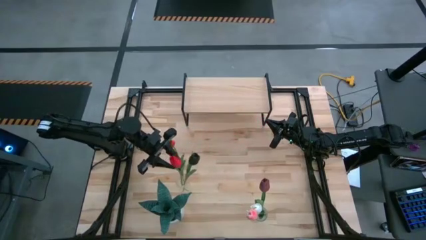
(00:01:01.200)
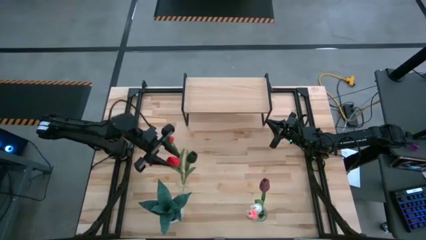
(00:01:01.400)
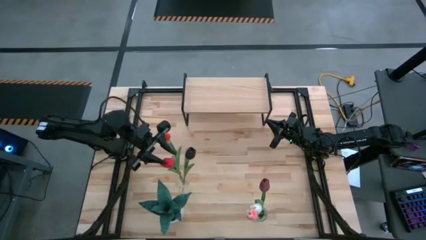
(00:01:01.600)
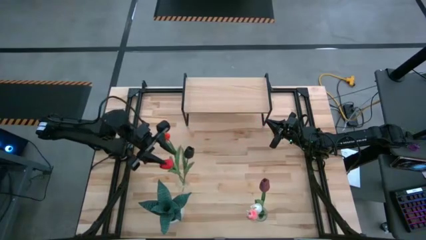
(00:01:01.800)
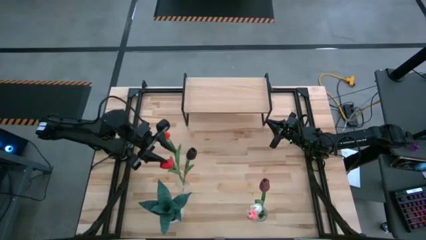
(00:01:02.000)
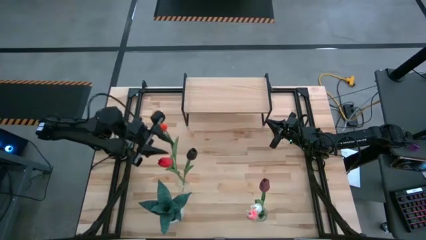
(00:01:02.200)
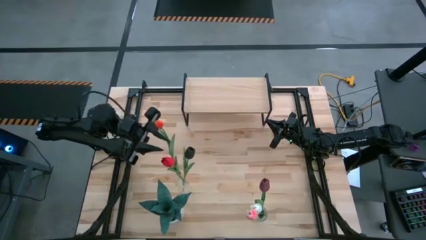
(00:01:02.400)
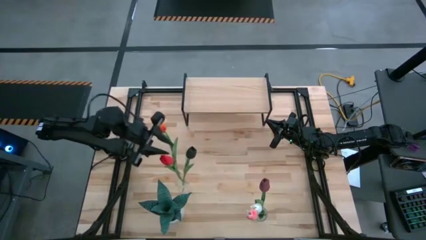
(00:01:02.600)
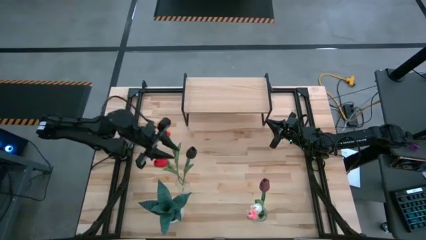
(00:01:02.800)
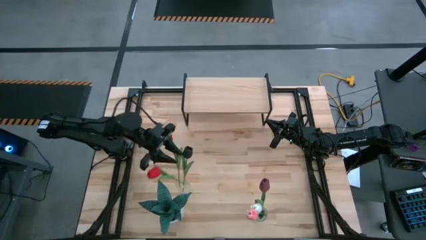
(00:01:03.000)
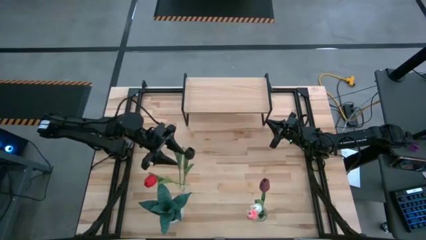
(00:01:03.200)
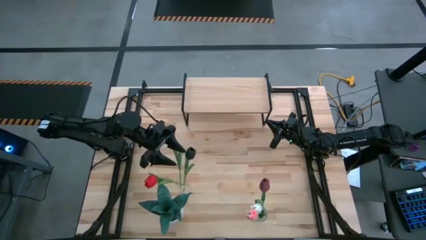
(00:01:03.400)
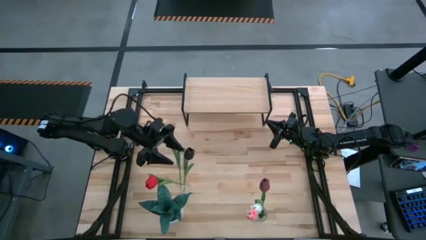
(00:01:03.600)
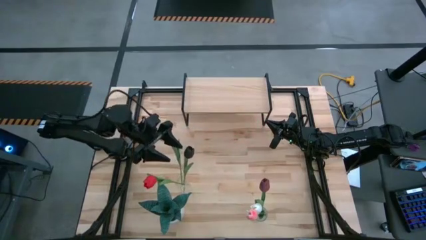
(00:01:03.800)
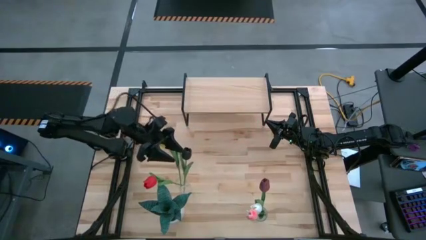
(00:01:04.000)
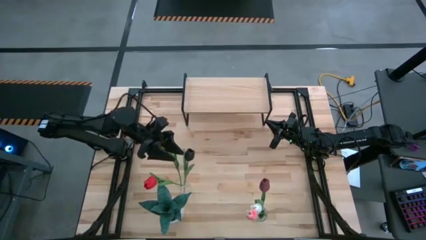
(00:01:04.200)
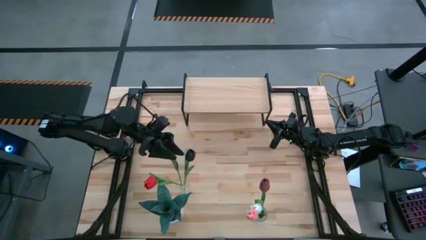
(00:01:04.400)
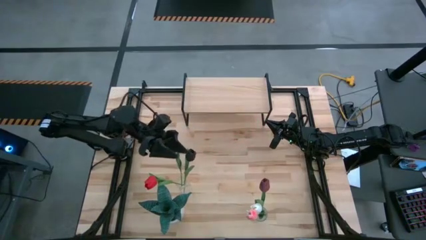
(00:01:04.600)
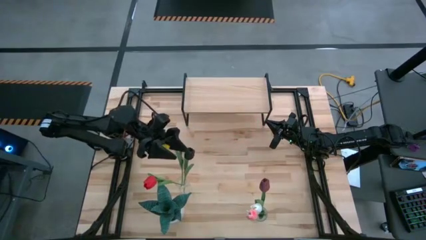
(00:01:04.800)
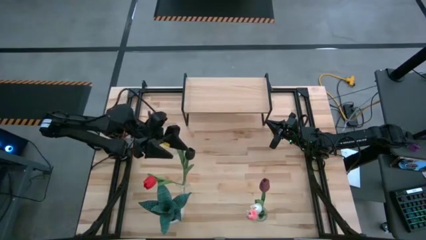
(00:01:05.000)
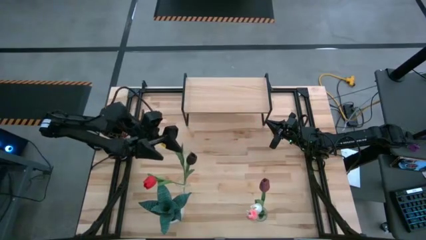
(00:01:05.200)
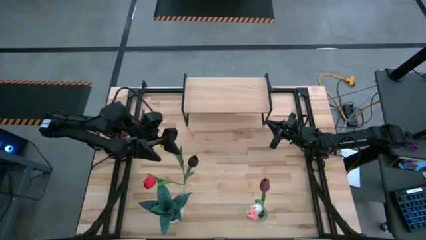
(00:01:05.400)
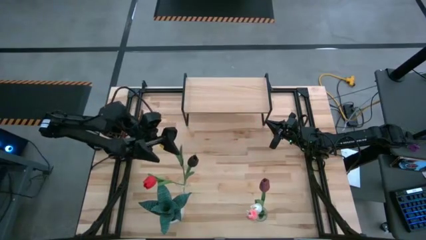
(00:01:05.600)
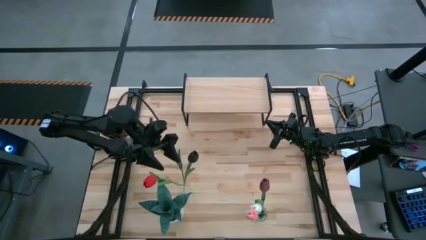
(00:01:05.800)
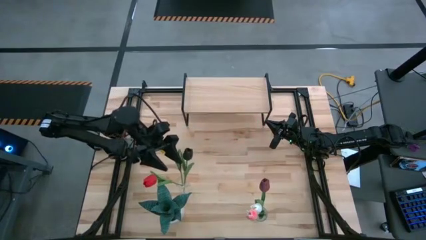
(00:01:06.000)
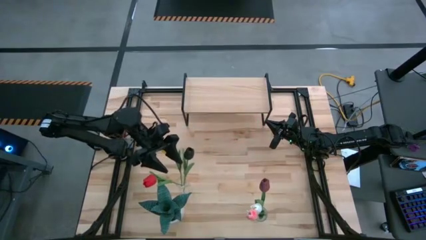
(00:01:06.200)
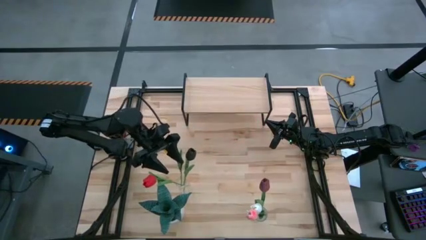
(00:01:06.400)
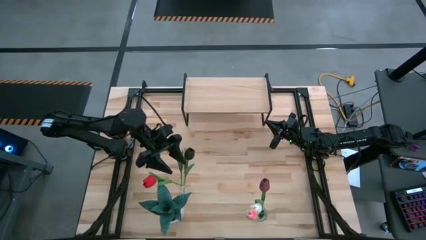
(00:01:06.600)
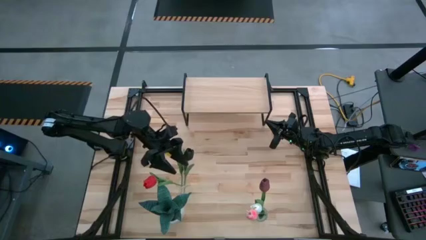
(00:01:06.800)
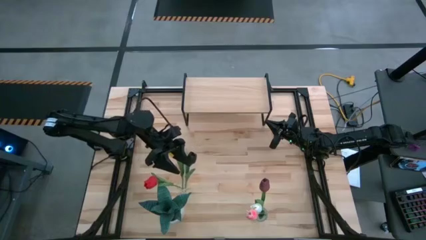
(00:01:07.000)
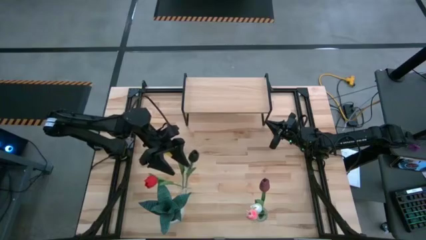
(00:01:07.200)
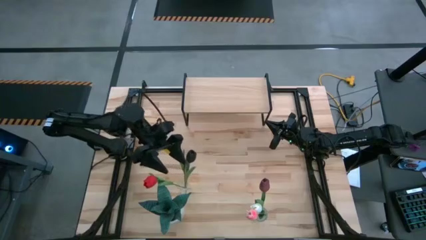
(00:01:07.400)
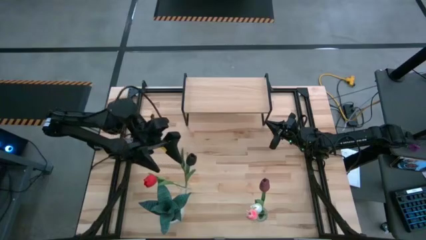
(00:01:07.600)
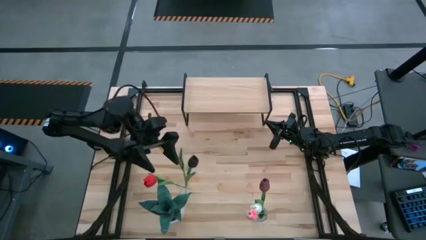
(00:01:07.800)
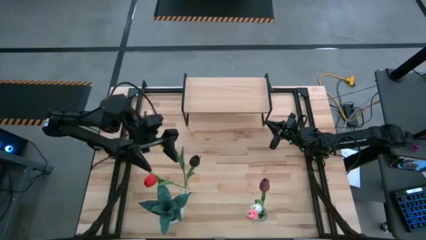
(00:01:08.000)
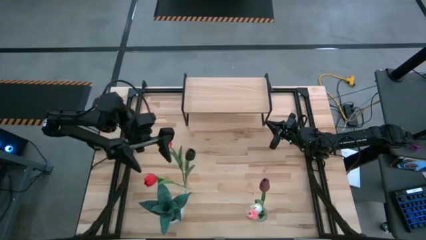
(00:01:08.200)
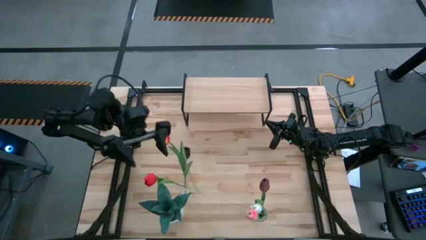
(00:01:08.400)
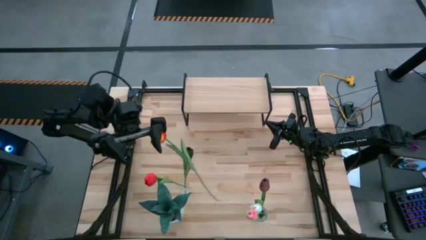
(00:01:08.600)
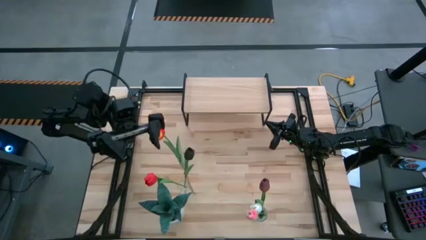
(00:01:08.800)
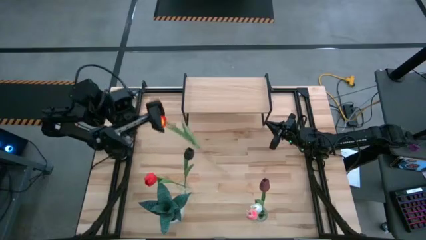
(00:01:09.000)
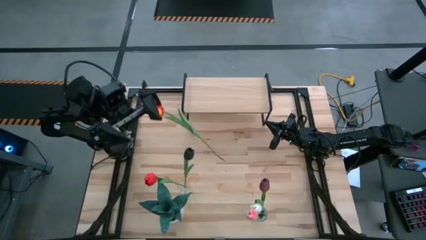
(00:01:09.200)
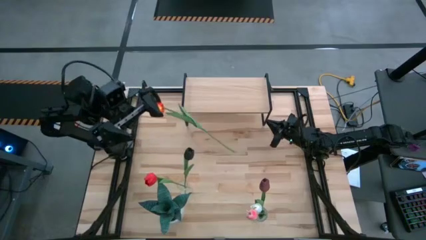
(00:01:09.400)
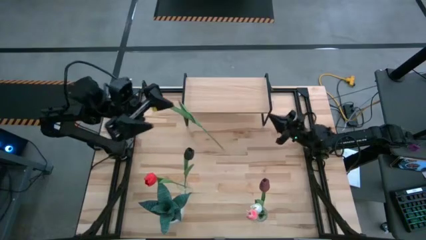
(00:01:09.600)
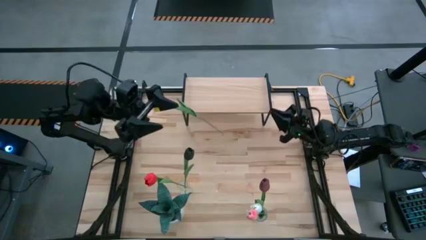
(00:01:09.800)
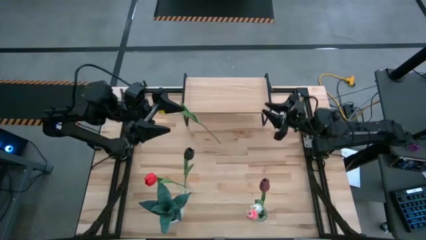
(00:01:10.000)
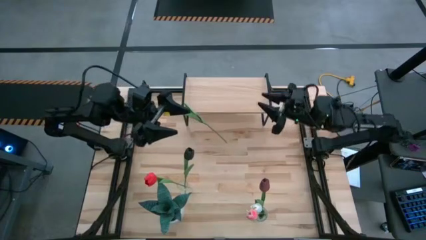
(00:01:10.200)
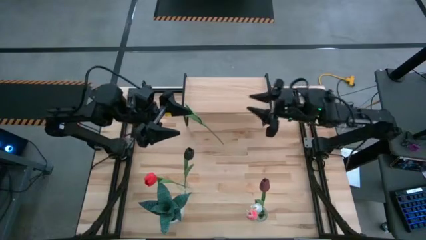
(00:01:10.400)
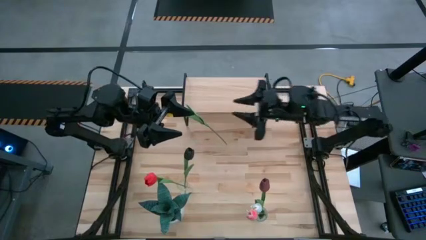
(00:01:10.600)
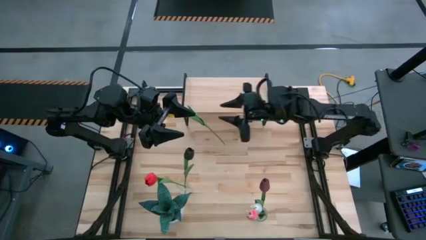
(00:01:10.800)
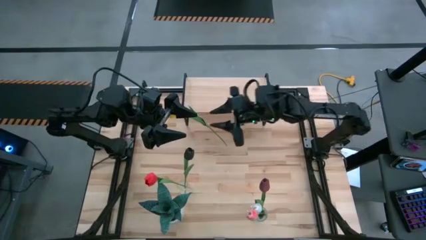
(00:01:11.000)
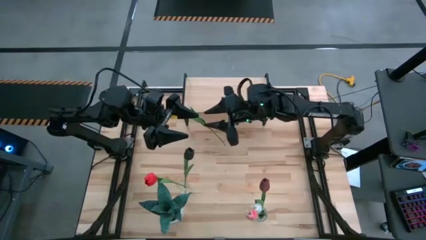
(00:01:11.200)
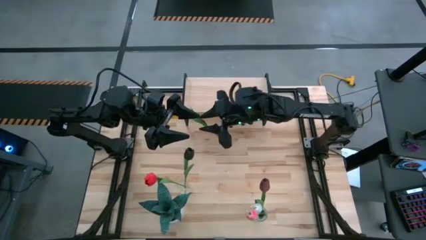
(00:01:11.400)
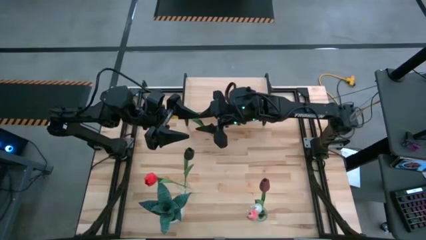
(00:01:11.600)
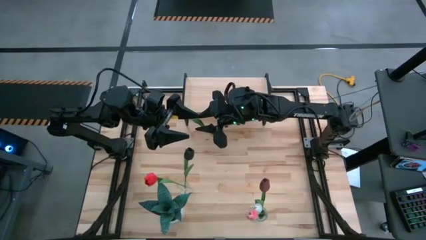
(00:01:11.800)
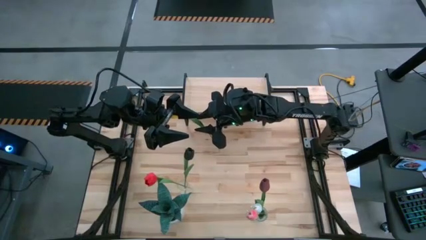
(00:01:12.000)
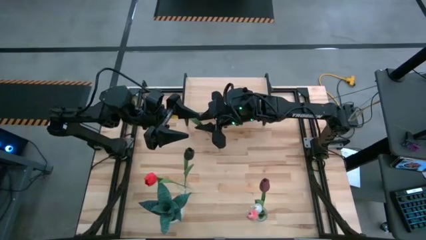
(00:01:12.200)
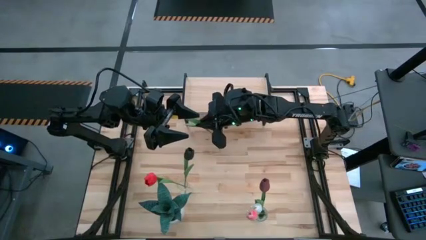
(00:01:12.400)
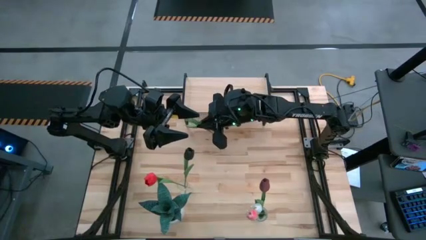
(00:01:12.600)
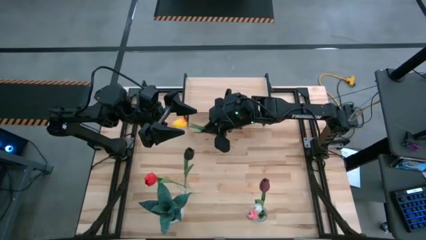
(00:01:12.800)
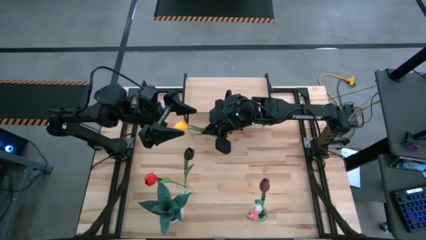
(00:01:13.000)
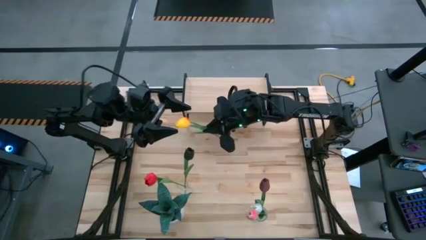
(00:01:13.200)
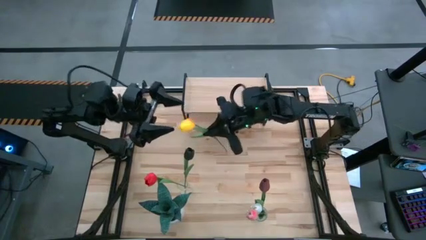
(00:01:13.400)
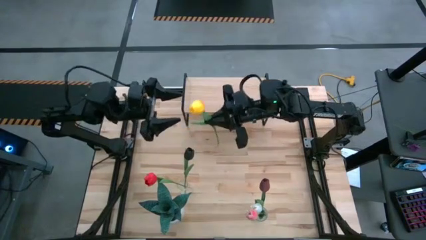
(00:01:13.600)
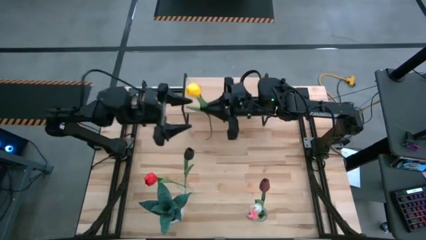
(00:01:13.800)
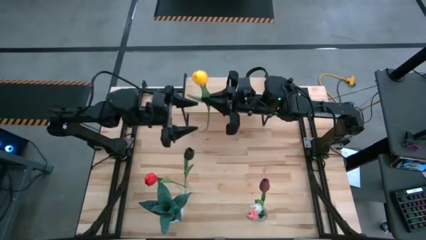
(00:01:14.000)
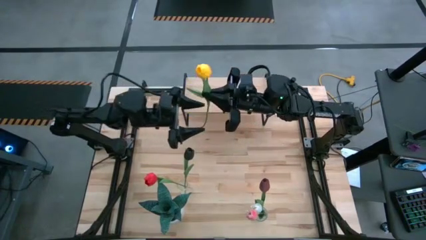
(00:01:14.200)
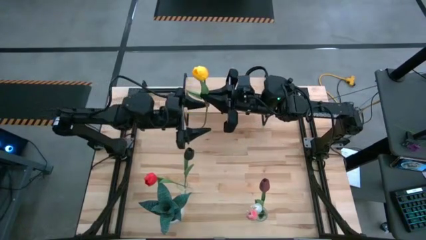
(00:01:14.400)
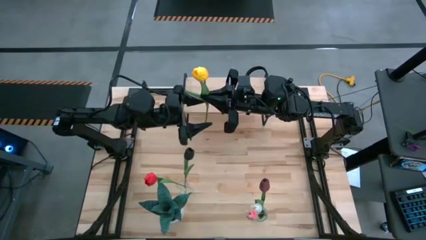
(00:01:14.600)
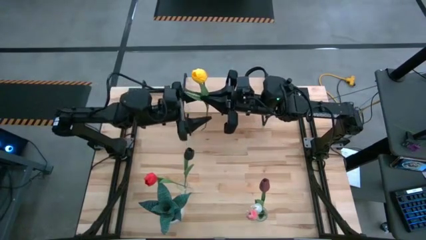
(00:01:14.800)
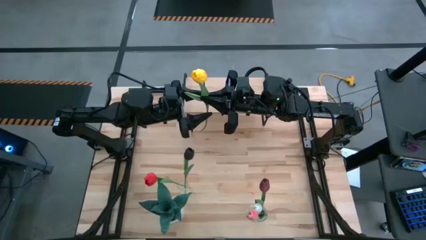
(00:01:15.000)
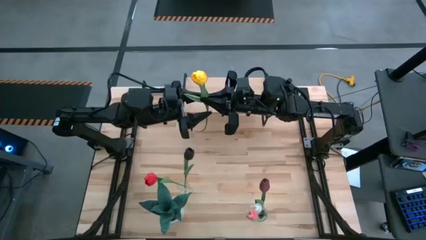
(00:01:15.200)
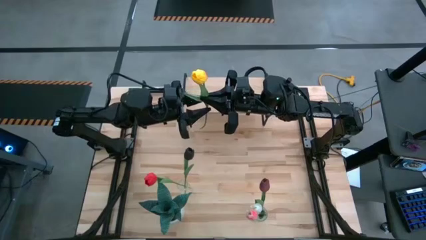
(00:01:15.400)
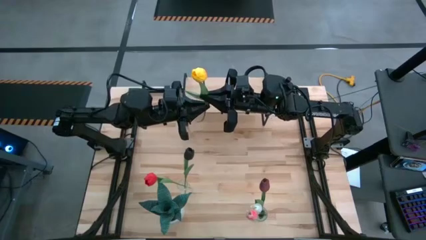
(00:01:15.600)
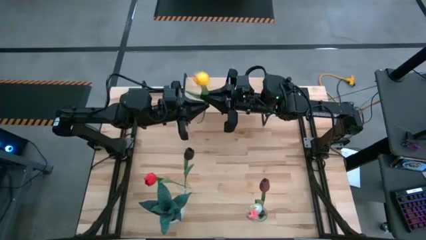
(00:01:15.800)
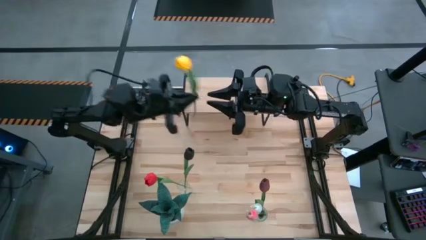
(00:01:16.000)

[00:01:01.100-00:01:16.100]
Task: Pick and place flowers into a vace then onto a shelf
Adjust the yellow flower in the top transparent vase

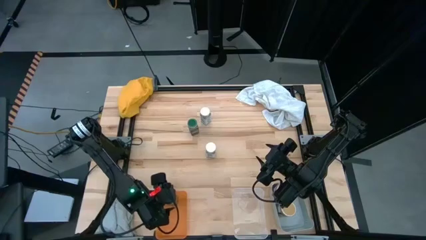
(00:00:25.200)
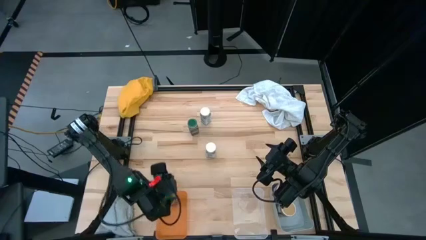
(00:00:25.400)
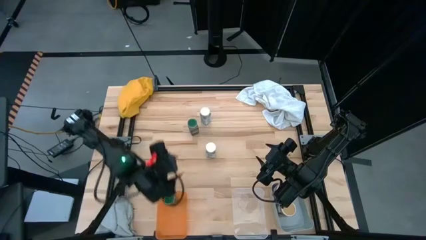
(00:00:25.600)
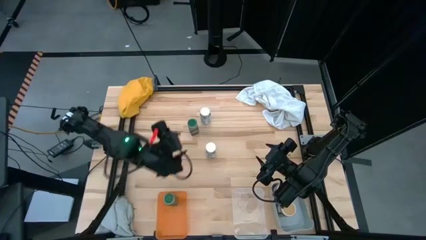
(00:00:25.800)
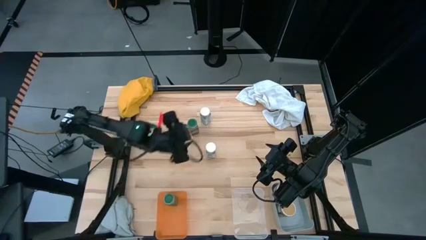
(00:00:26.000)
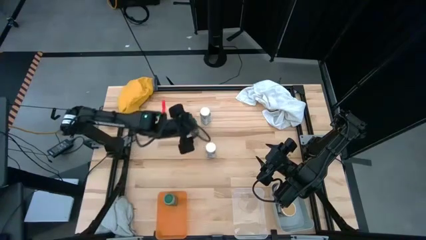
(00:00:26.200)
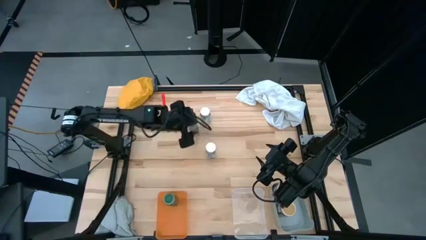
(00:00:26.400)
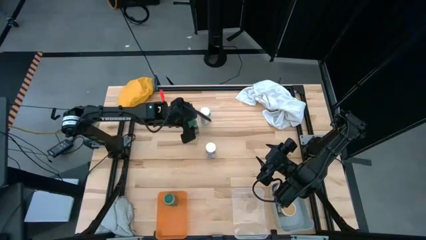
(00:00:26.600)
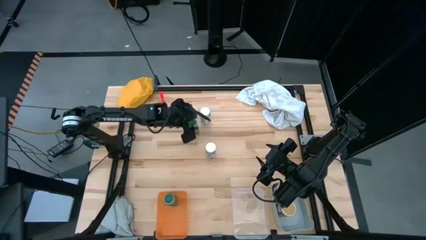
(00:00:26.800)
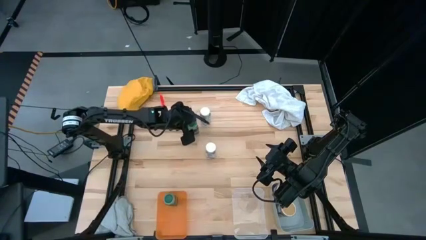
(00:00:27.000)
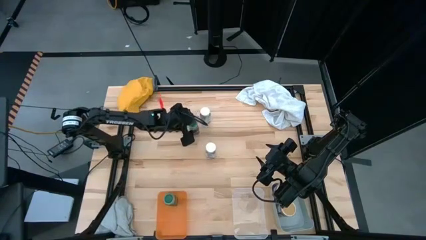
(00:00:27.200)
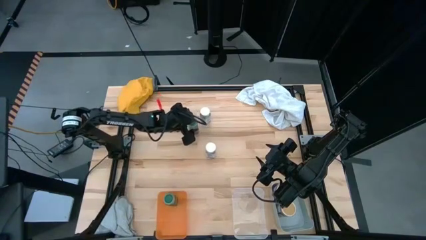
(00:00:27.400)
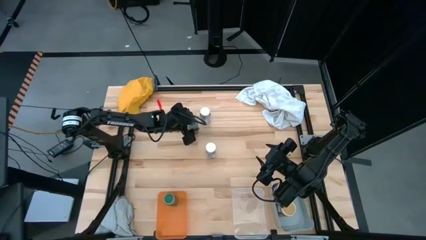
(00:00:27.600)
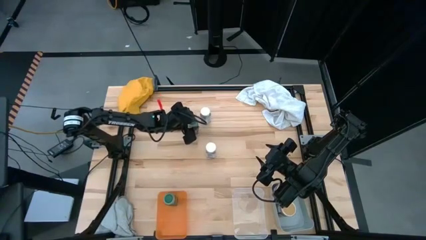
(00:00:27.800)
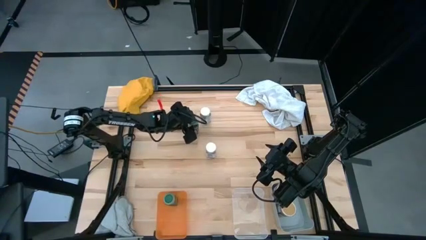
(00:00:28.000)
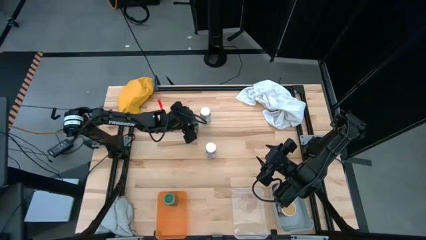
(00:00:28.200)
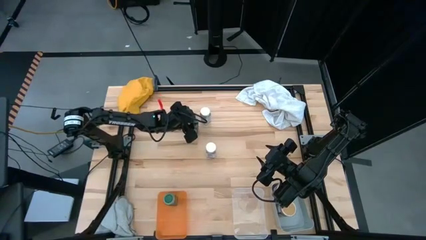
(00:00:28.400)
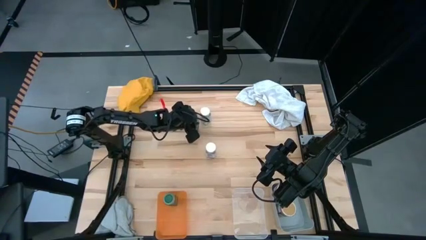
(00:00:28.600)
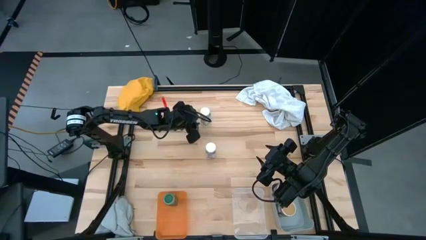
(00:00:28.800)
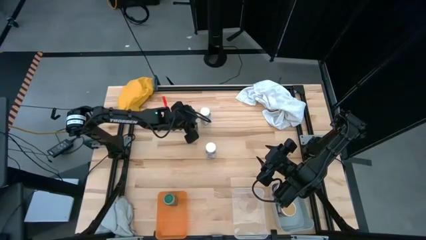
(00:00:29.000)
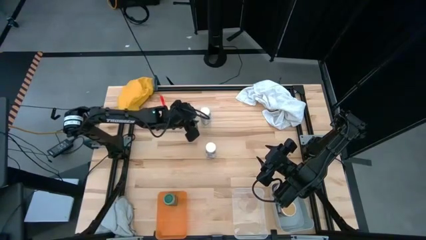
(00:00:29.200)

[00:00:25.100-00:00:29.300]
Task: Sort spices by type
Put the green spice bottle into the orange bin
